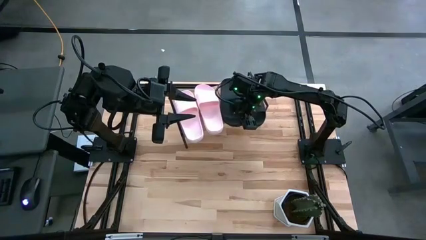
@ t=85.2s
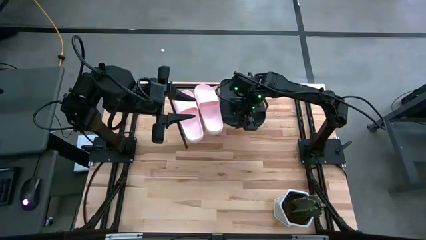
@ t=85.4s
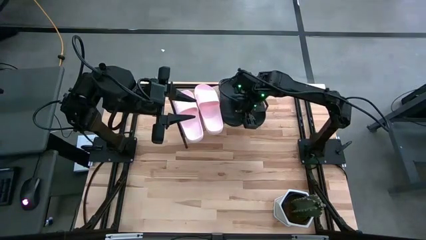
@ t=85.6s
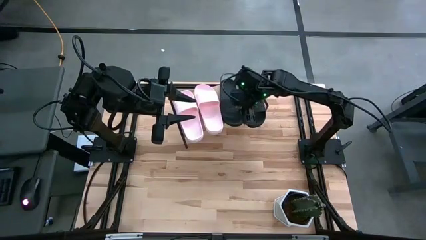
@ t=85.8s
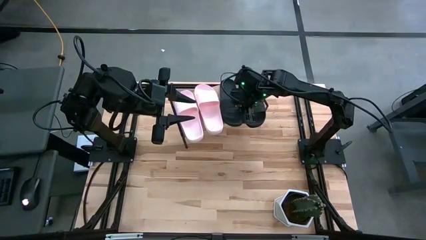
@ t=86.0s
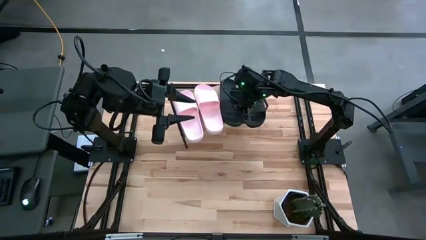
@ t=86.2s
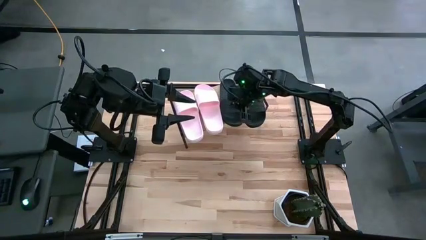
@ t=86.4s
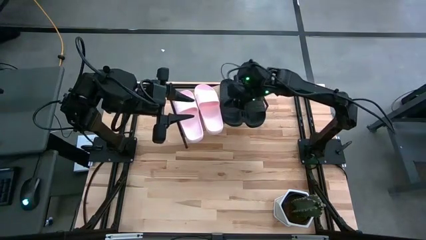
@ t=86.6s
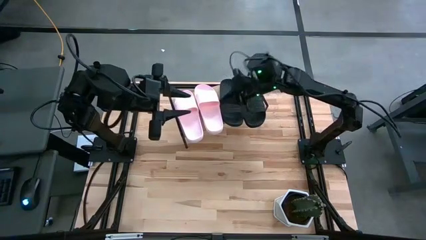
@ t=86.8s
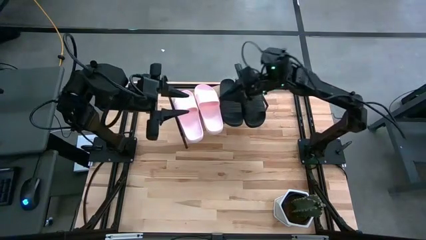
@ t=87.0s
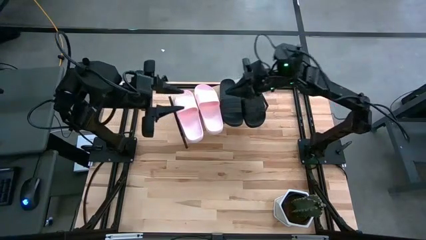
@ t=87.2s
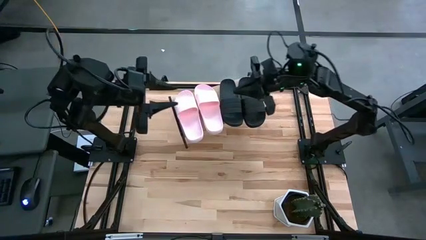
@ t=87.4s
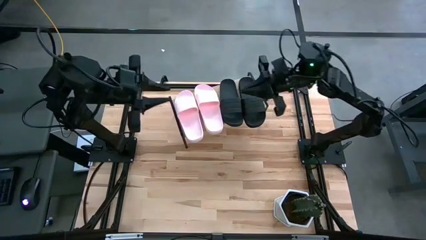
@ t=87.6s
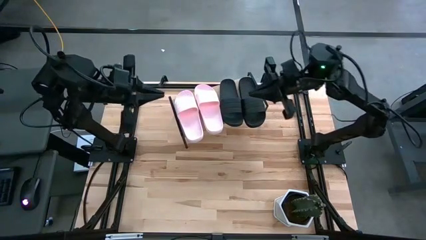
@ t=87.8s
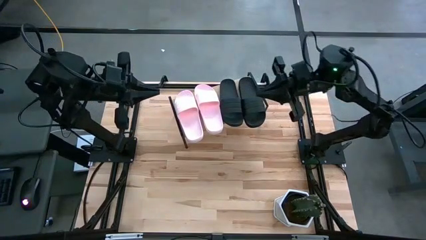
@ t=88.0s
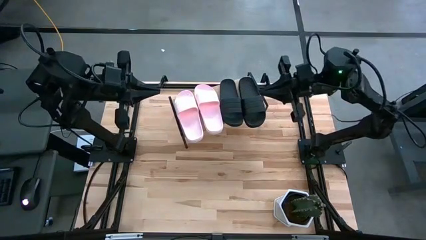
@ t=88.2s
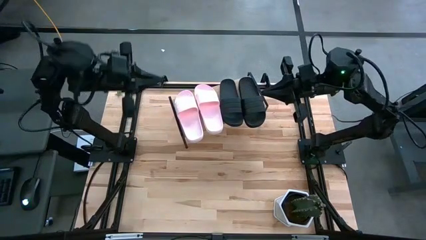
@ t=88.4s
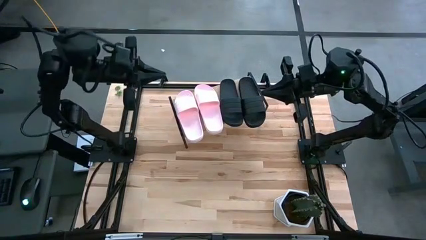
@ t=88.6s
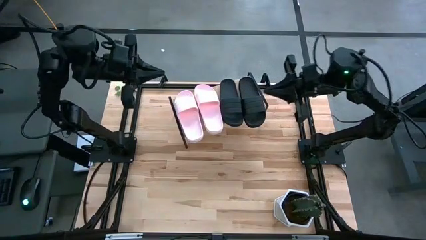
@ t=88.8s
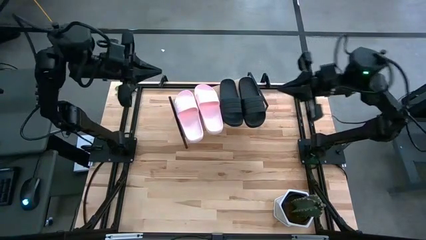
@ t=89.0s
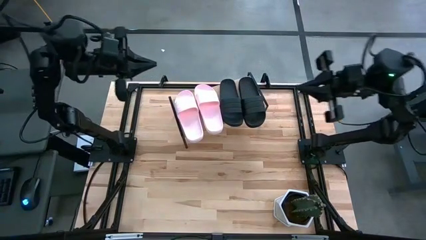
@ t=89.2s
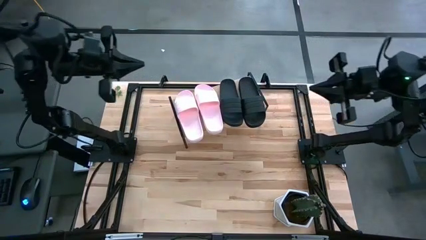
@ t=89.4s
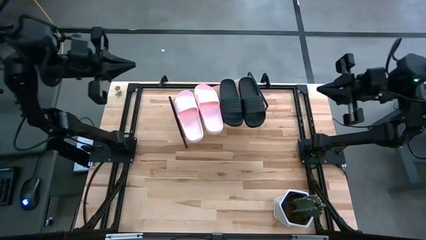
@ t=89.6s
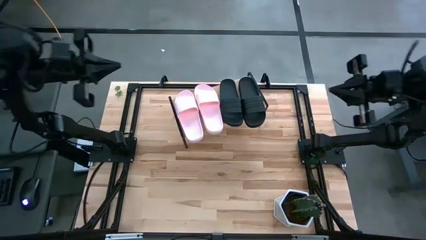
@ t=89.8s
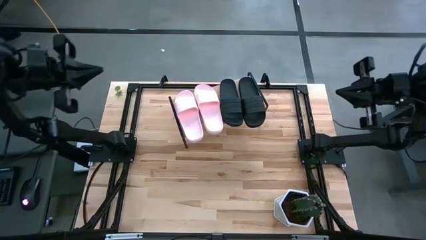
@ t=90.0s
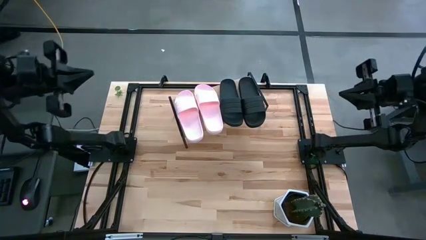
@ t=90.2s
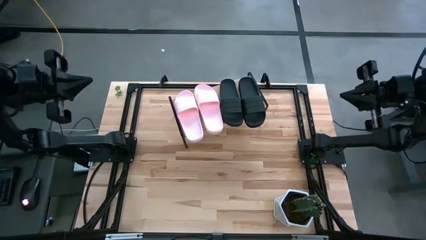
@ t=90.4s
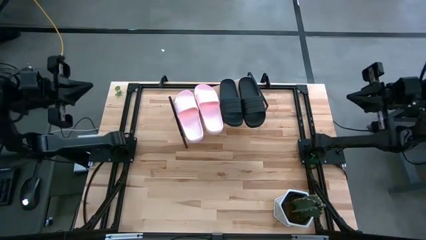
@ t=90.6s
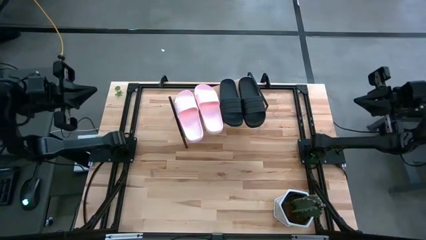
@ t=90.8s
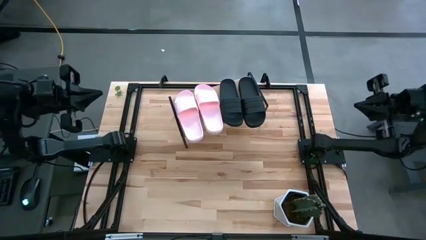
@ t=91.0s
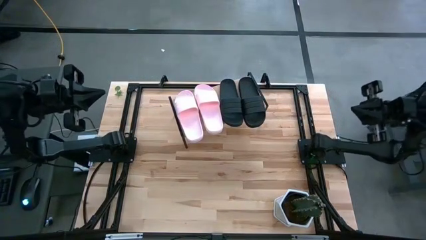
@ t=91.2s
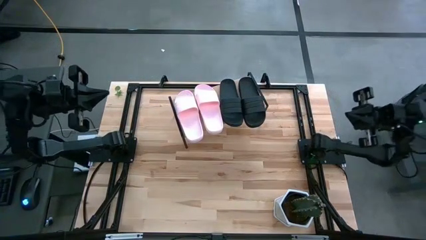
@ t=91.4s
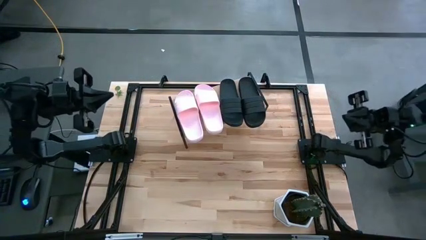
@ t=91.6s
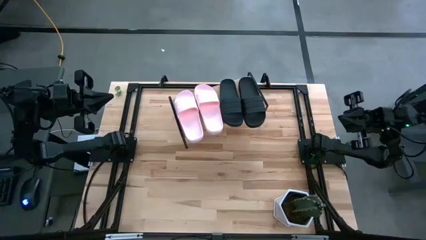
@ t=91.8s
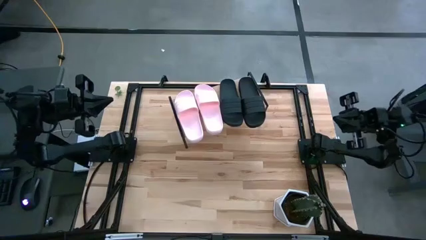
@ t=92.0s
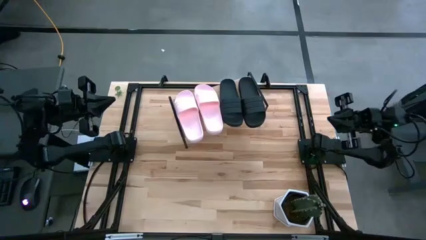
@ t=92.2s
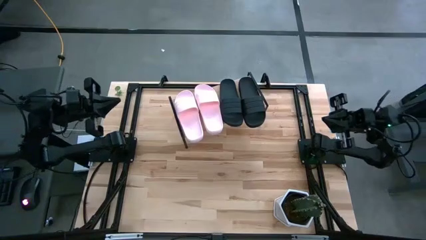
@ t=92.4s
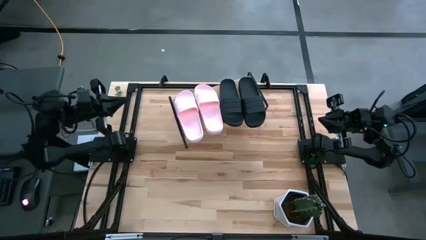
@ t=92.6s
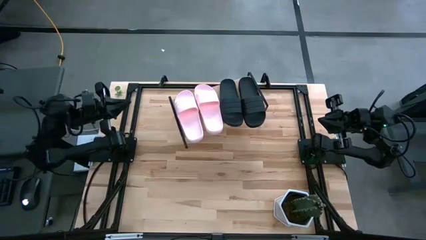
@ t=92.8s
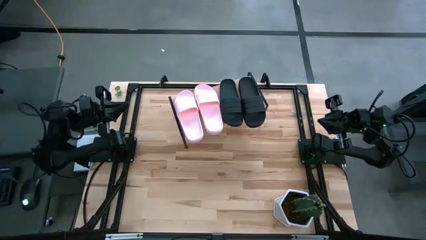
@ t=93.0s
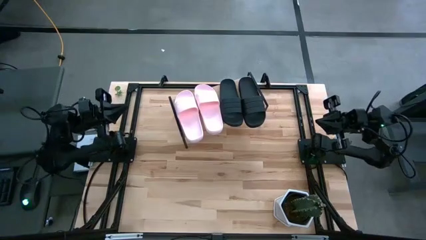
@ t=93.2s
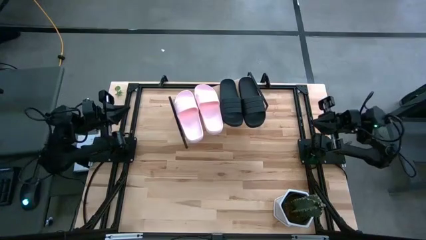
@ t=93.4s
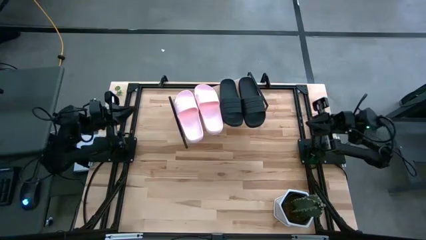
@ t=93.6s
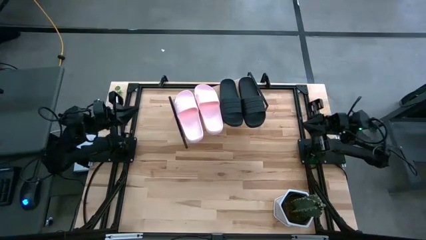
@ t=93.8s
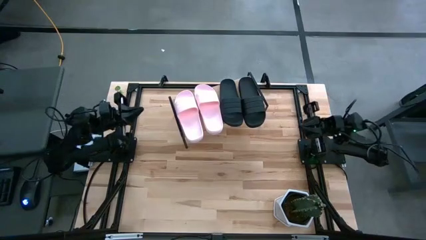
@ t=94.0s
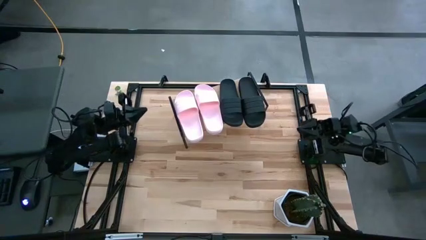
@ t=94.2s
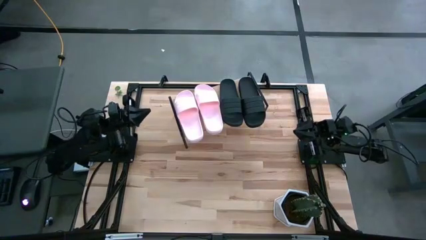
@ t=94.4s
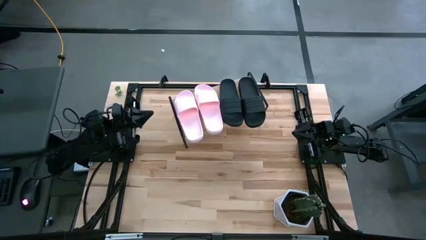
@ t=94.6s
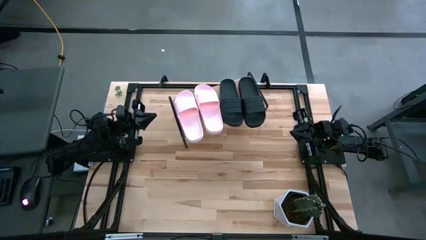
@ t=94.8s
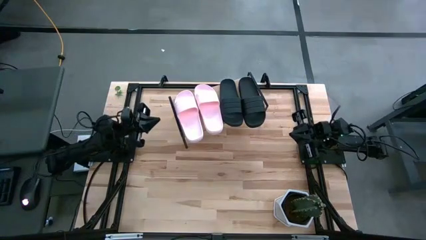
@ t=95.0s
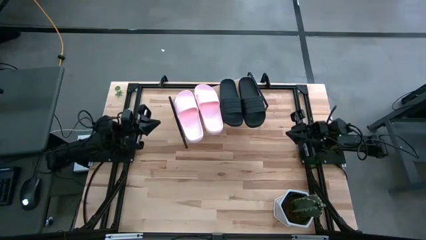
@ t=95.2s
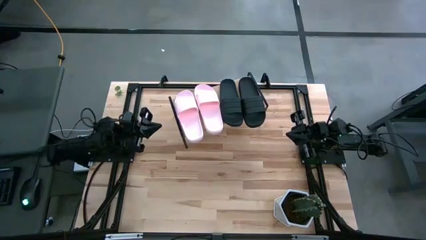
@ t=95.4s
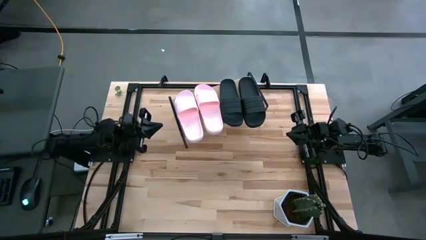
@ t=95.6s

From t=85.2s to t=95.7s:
Task: Pick and place slides into the shelf
Return to Home Position

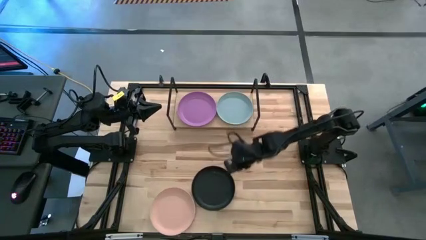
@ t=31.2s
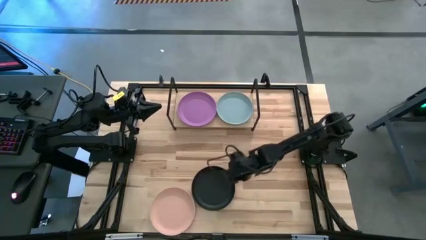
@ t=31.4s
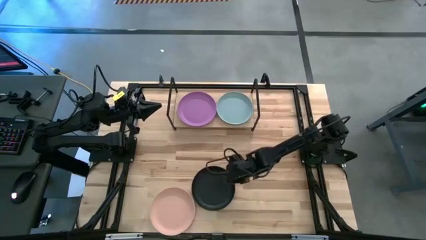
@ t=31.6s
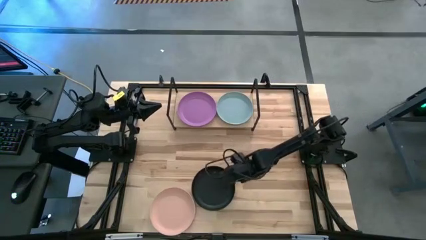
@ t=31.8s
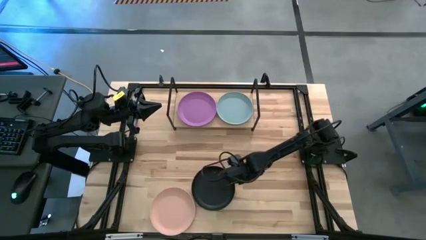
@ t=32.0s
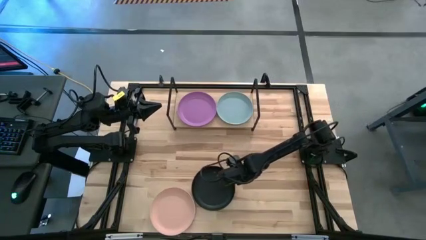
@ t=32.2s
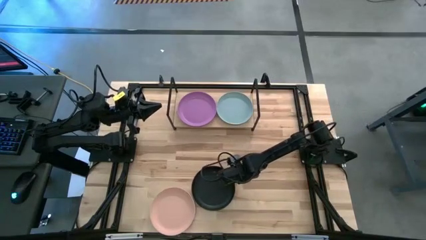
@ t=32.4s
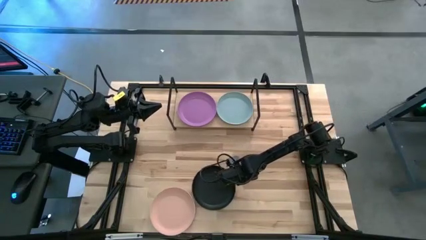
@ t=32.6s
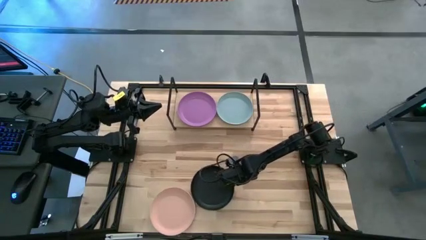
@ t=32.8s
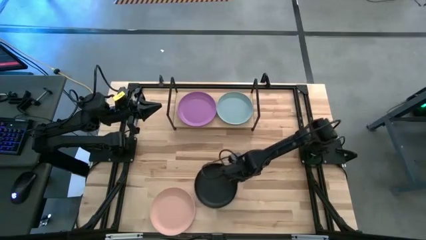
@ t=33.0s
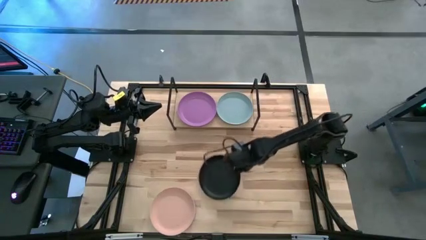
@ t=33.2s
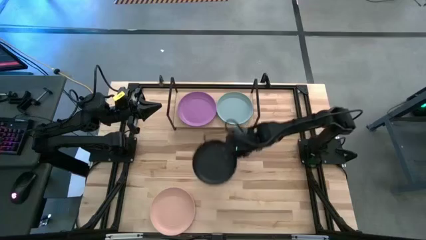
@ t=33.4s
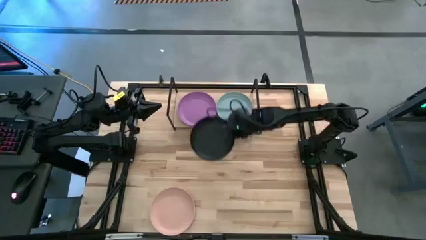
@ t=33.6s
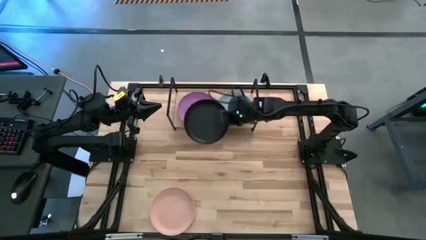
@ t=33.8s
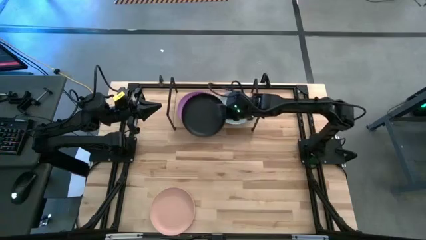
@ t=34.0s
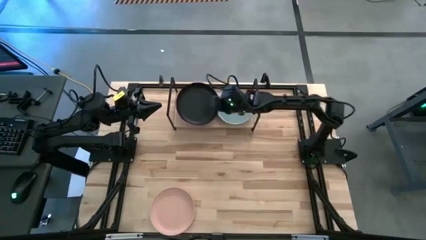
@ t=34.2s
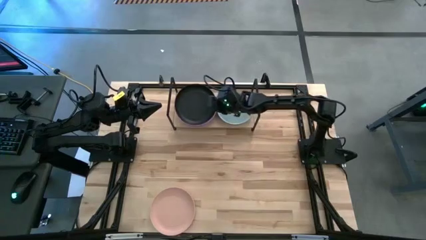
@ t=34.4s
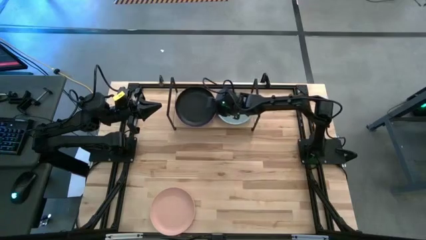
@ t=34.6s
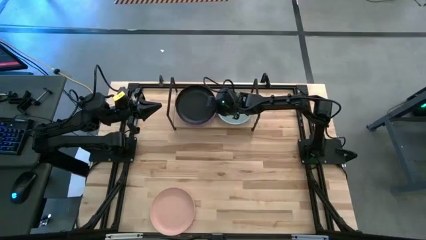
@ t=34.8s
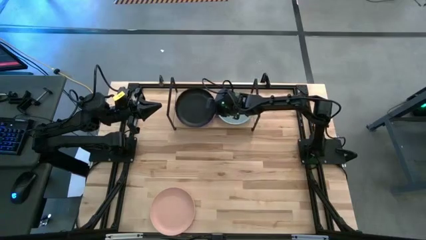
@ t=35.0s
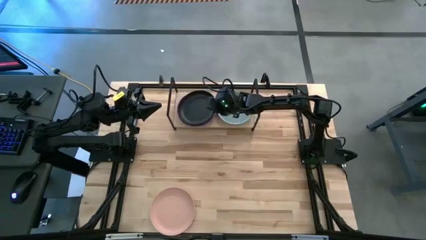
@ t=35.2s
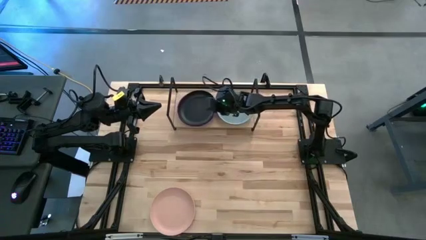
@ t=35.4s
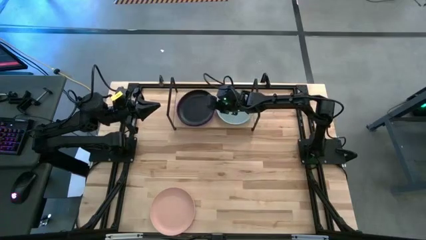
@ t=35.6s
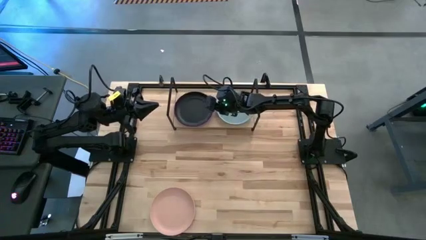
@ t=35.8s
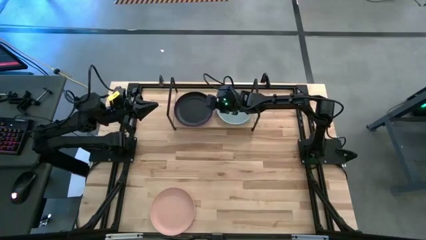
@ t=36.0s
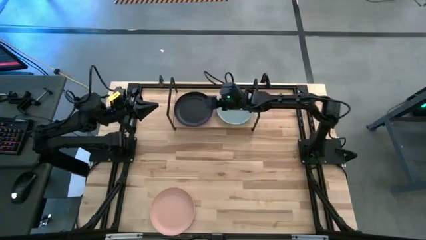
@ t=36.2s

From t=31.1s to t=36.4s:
Task: Place and stack plates onto a shelf
Stack the black plate on top of the purple plate on the shelf
